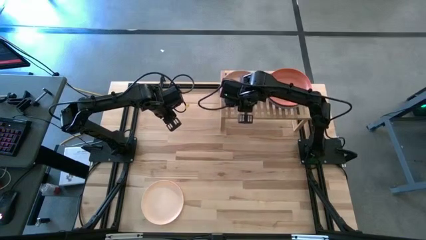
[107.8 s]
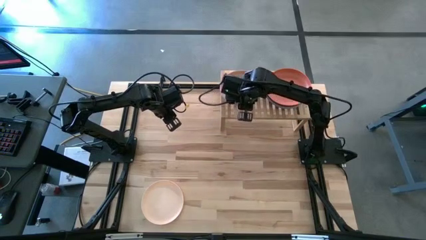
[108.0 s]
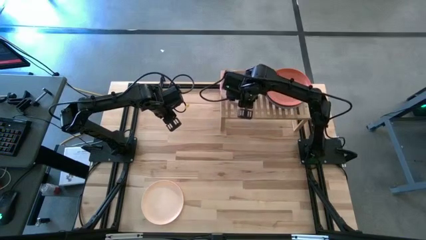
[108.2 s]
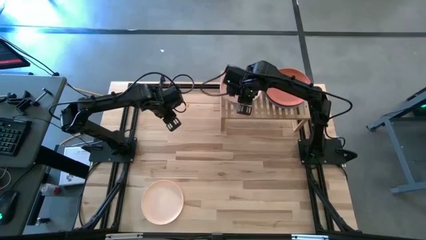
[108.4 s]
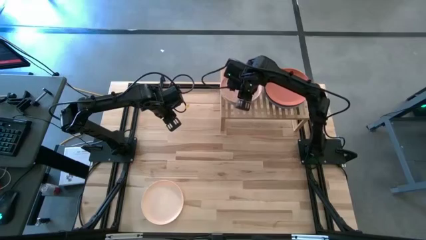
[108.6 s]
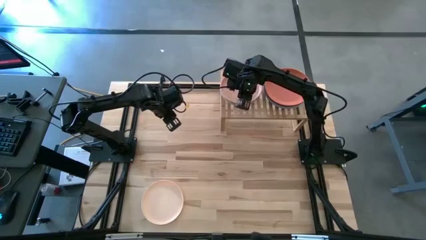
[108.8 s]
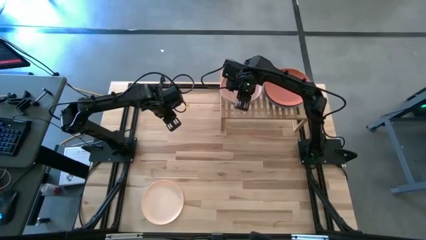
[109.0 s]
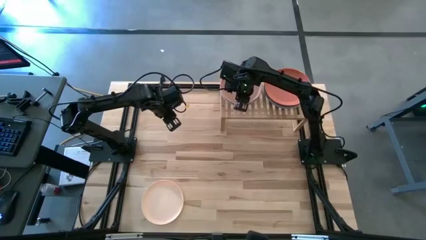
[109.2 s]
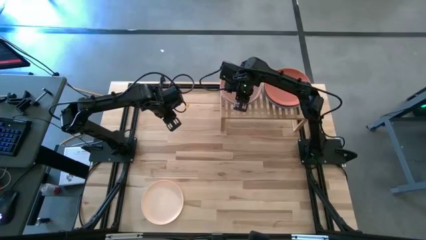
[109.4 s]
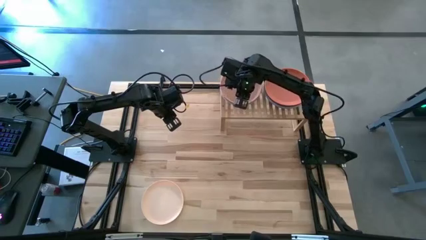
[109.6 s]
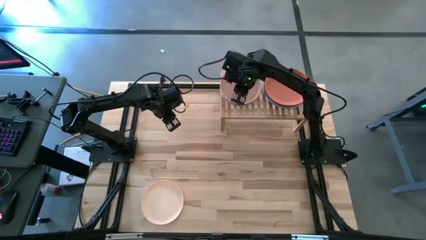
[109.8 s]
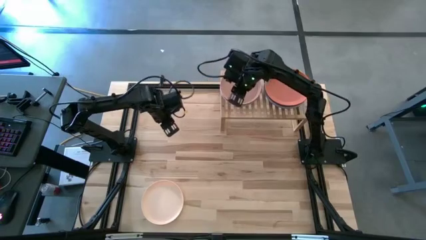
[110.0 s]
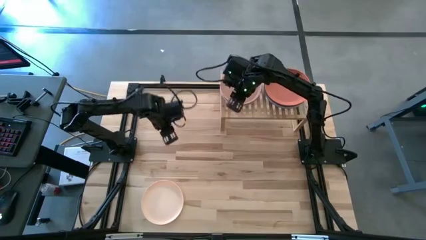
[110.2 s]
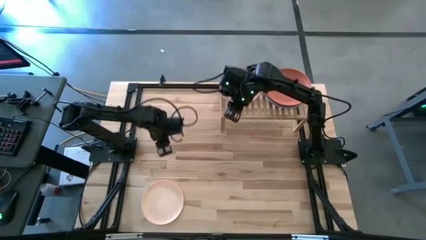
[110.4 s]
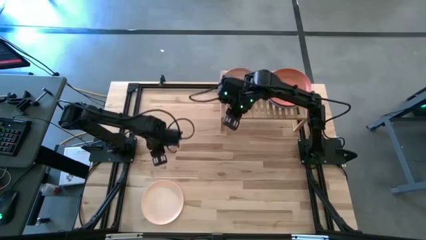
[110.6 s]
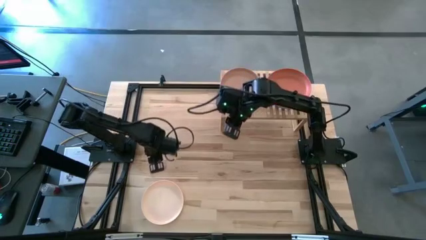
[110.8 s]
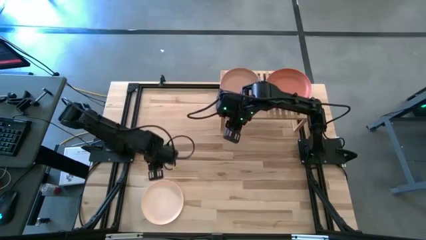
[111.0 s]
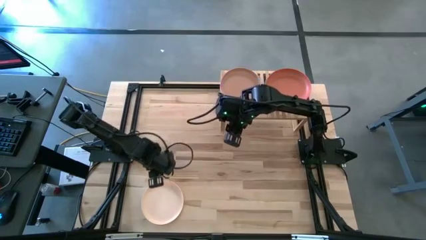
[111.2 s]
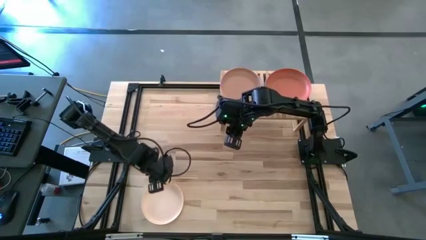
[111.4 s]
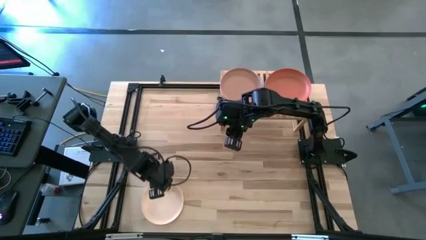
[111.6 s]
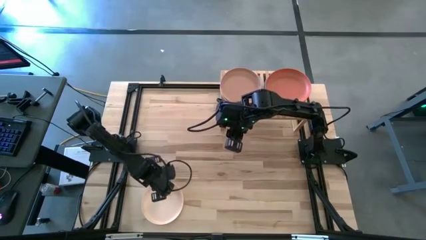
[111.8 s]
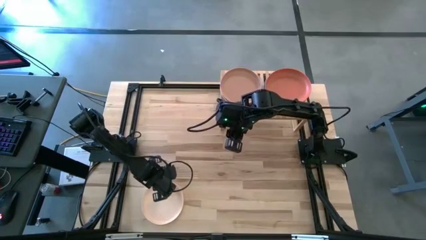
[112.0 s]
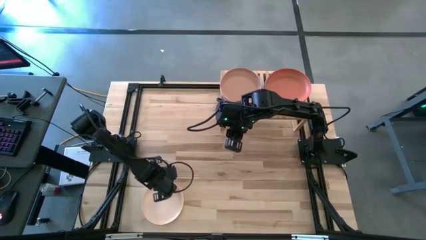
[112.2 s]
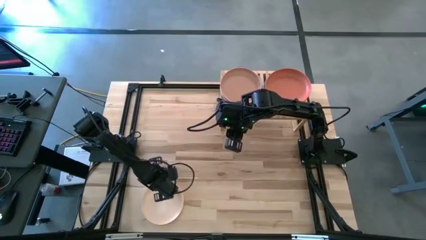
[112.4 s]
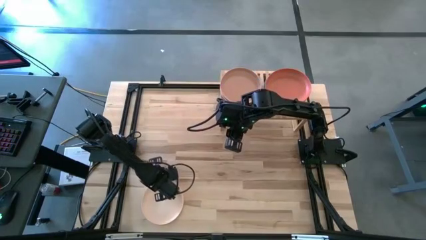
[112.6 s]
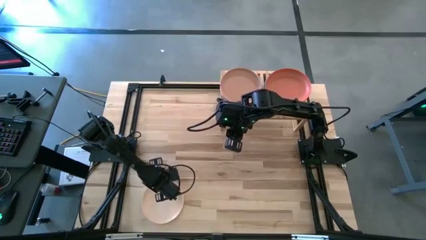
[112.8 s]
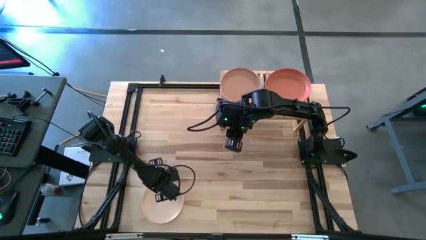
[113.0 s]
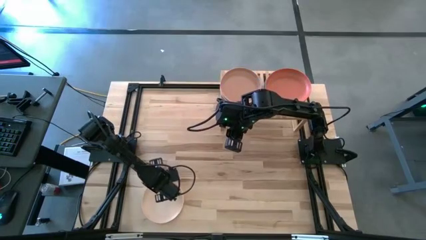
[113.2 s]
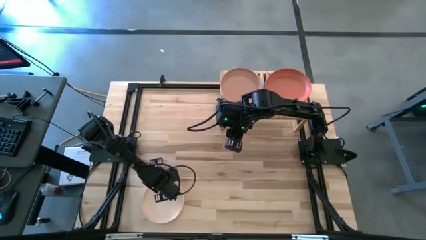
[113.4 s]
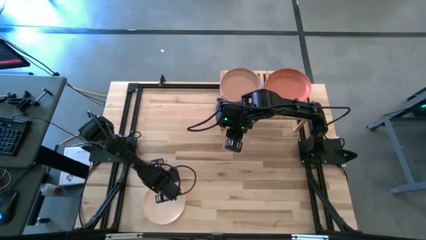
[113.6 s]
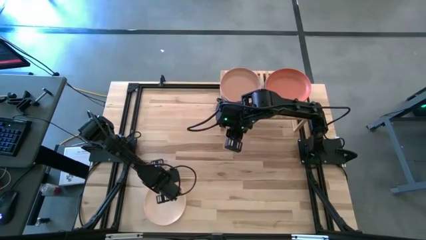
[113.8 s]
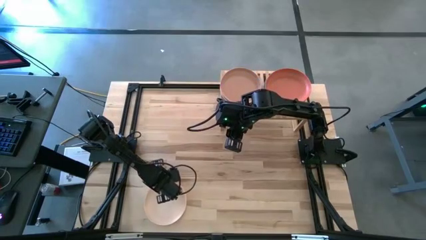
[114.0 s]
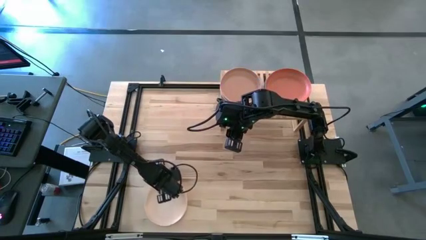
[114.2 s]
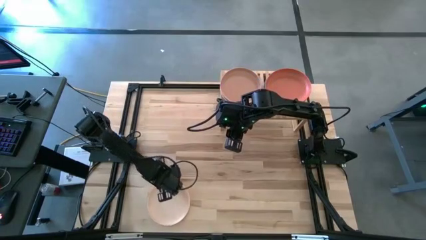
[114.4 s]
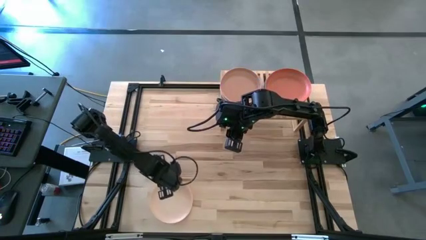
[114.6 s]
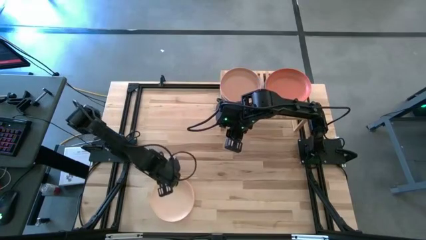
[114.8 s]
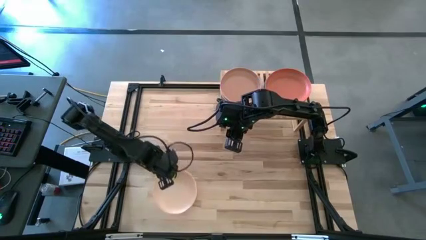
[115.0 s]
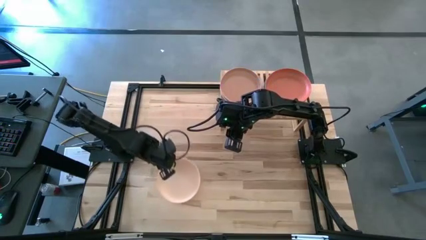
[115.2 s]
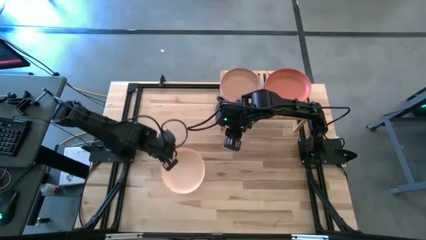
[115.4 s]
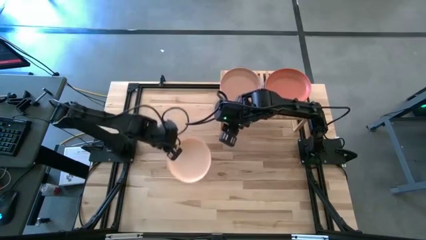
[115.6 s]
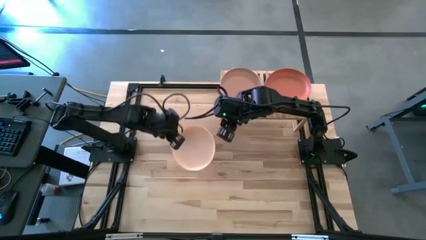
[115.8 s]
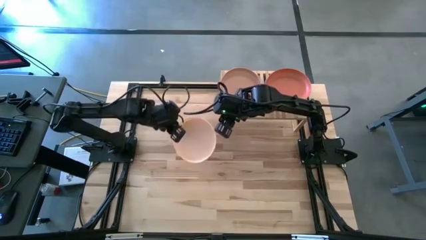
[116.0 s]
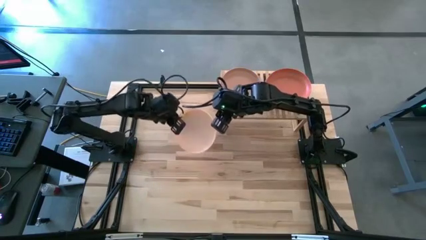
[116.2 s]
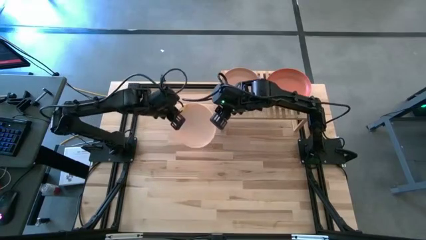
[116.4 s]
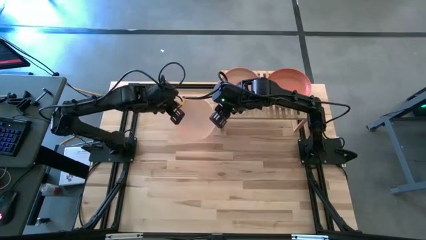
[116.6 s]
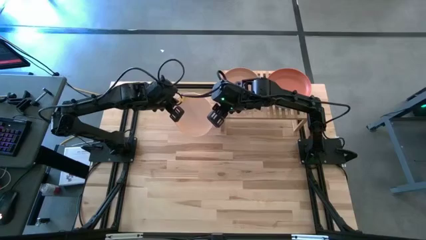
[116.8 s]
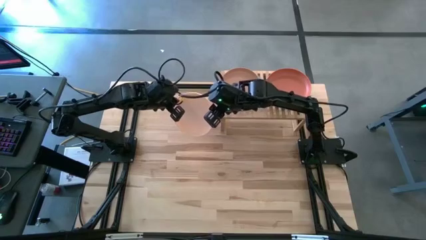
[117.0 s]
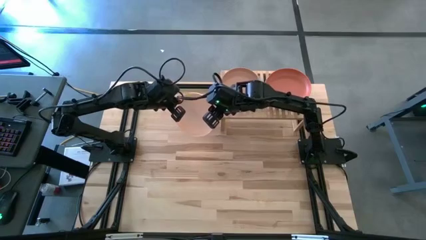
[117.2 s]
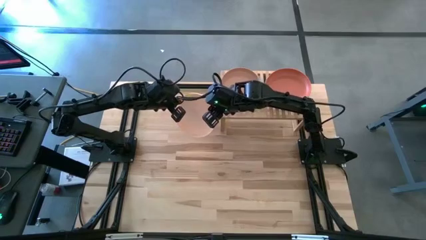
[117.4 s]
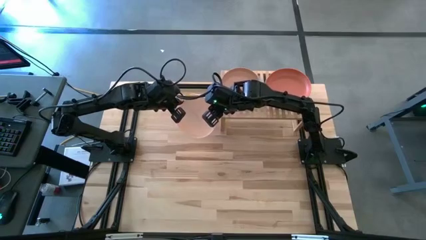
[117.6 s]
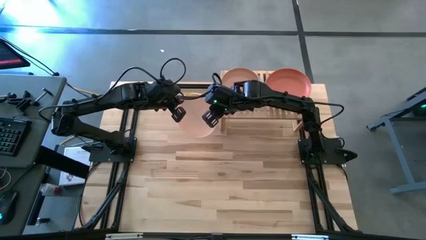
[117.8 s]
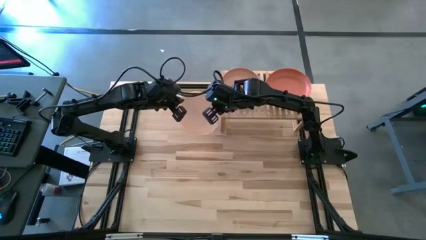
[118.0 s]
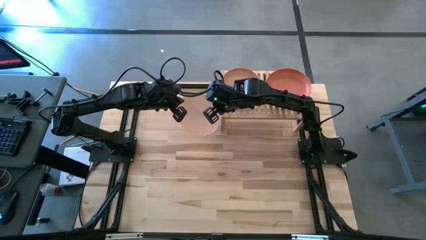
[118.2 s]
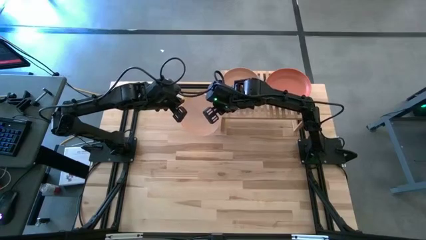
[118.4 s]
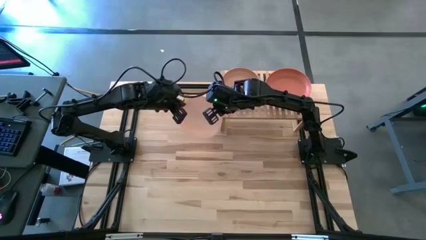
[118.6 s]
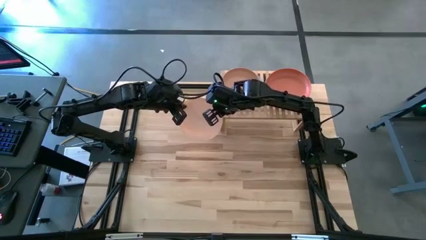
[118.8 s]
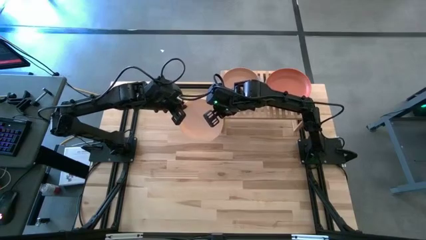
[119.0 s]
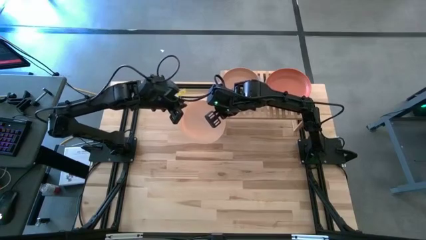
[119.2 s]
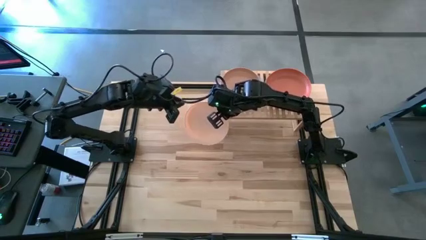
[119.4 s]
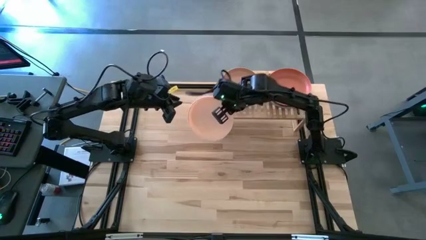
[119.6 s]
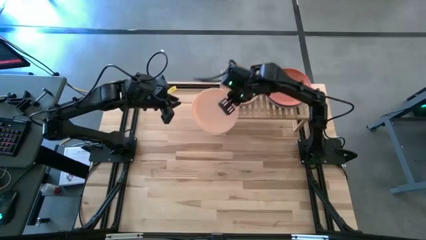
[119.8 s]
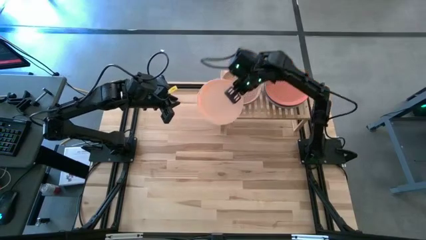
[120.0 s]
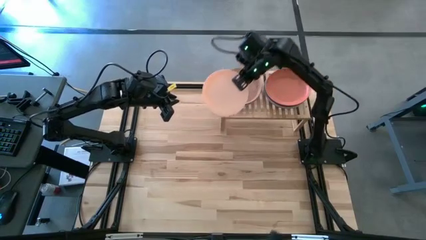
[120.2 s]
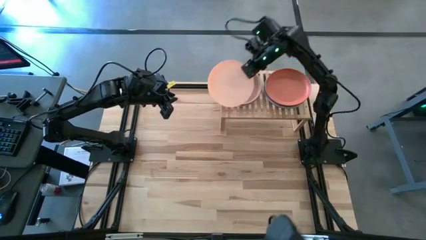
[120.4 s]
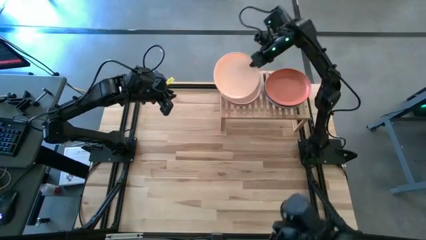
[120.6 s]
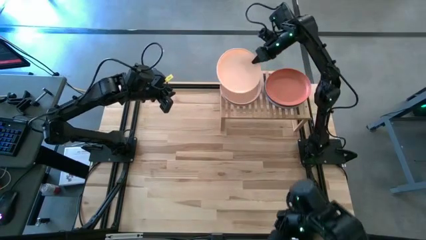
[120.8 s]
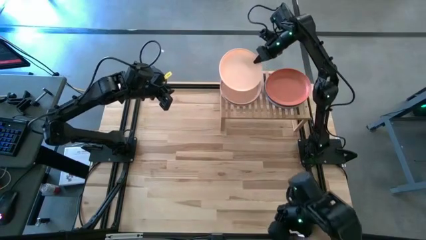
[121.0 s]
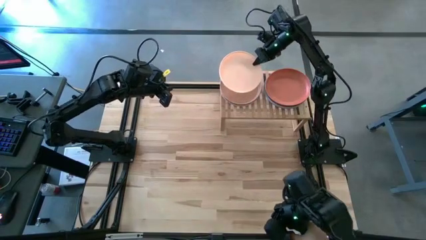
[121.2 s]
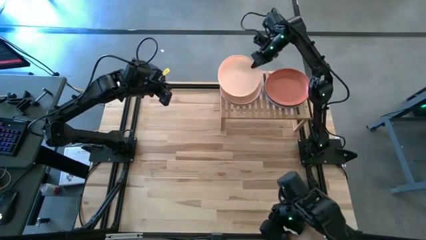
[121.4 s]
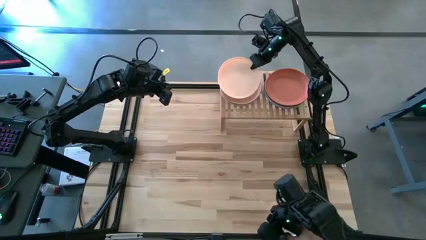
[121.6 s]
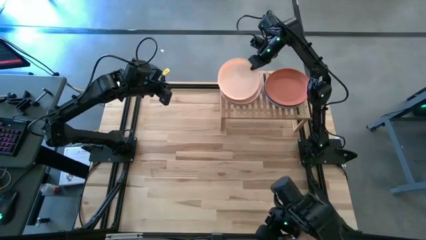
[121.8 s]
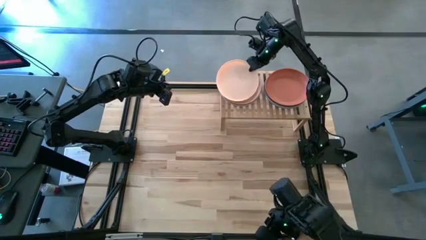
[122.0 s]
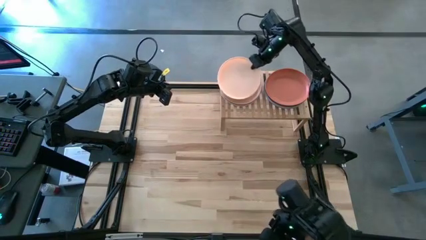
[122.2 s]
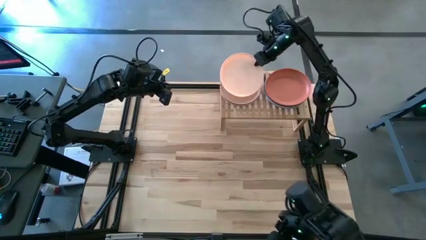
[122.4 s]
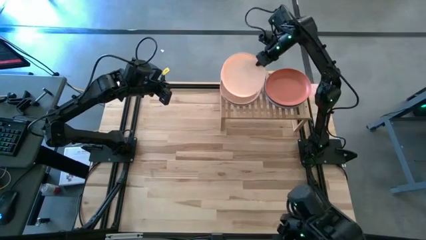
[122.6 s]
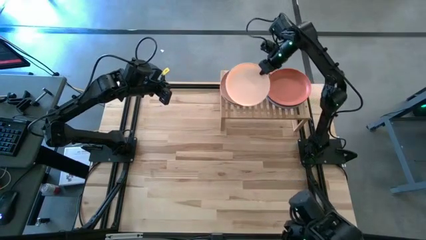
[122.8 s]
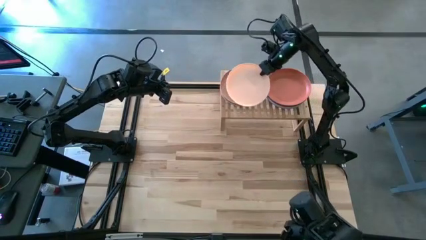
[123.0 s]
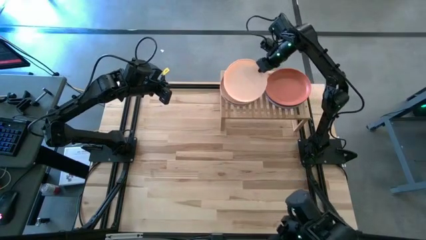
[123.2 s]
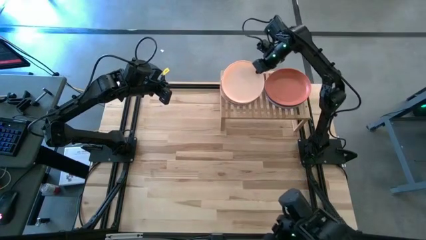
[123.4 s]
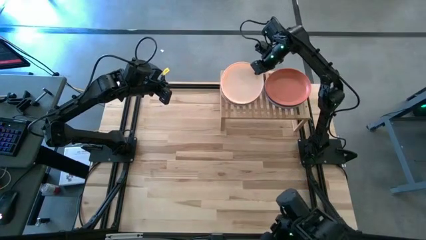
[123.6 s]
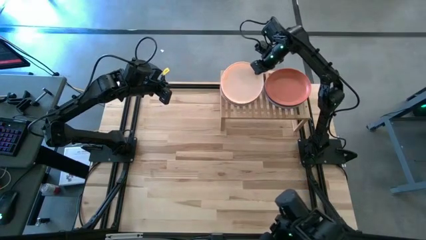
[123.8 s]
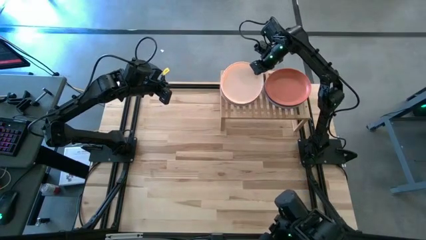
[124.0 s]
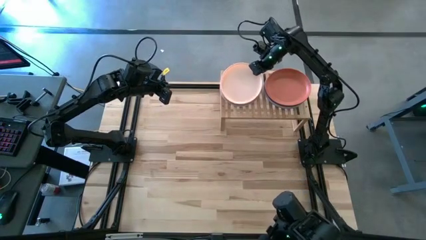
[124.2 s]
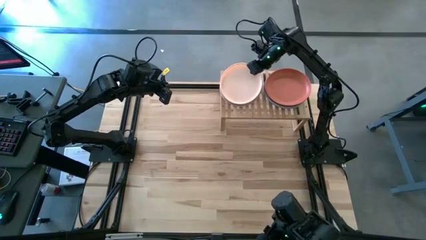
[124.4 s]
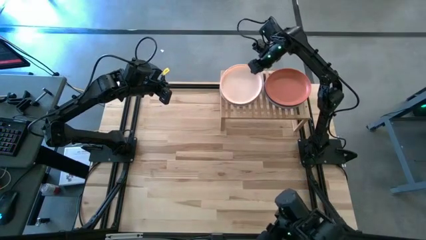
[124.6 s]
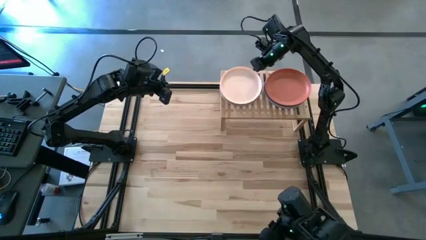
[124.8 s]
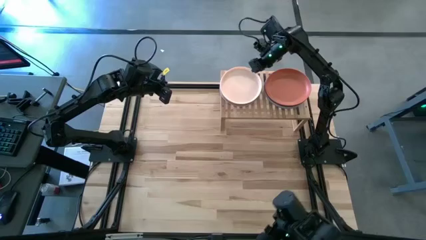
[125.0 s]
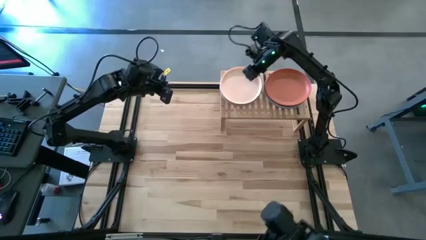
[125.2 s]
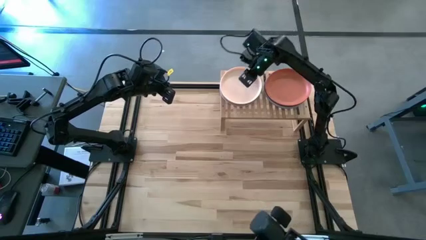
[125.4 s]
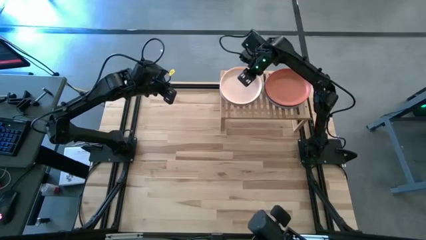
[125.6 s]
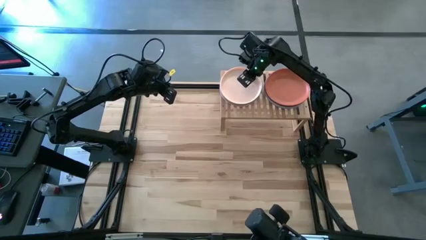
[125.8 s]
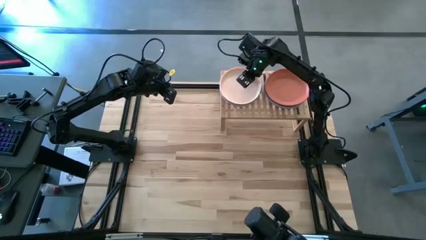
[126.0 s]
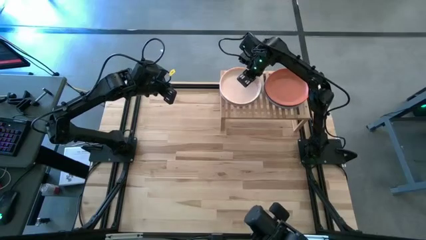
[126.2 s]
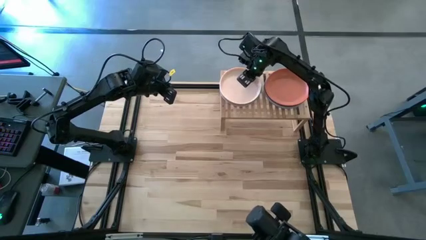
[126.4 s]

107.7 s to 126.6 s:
Task: Place and stack plates onto a shelf
Stack the light orange plate on top of the brown plate on the shelf
